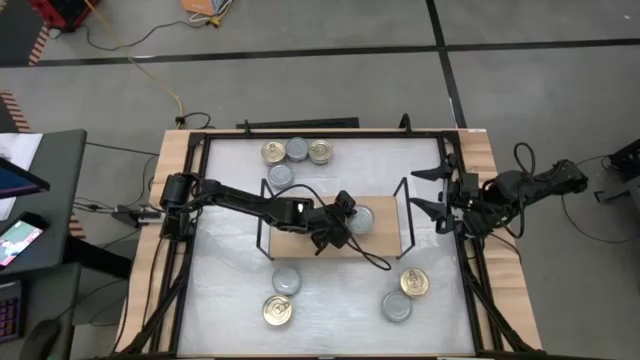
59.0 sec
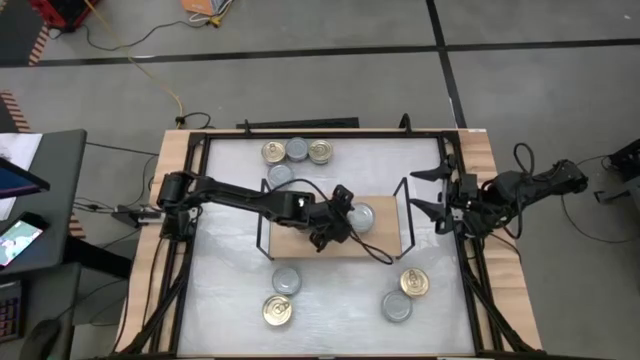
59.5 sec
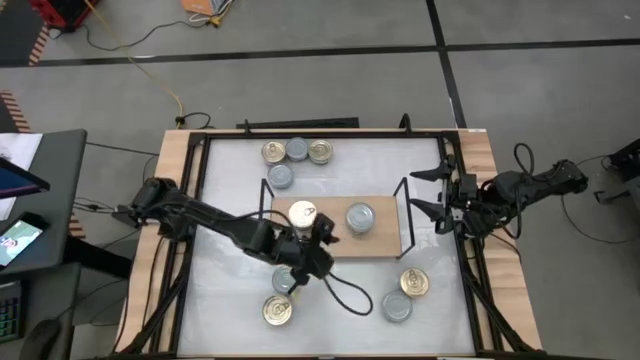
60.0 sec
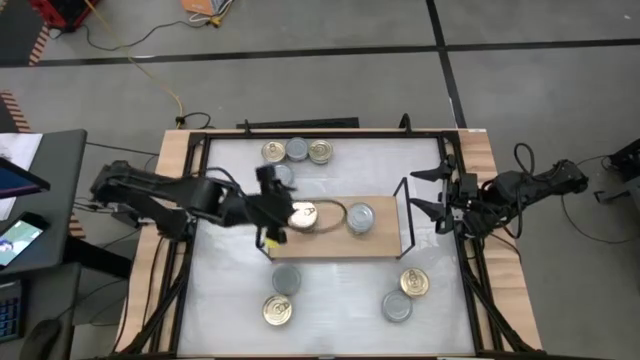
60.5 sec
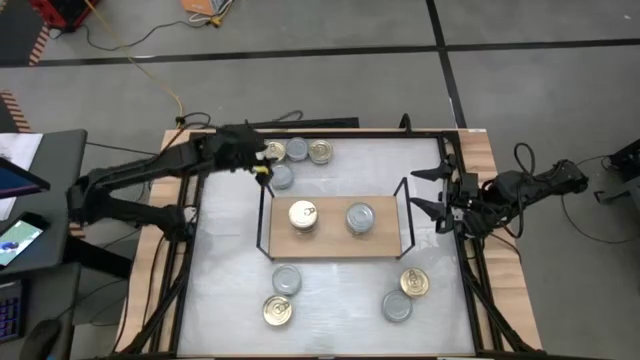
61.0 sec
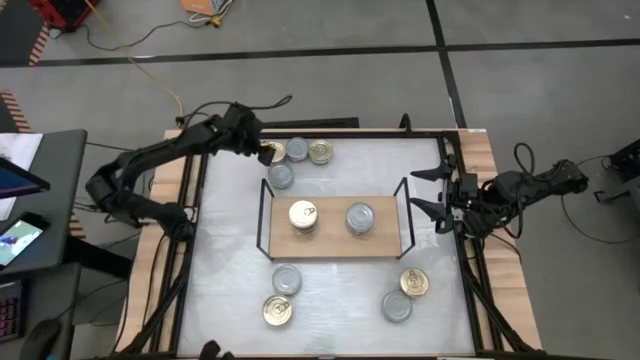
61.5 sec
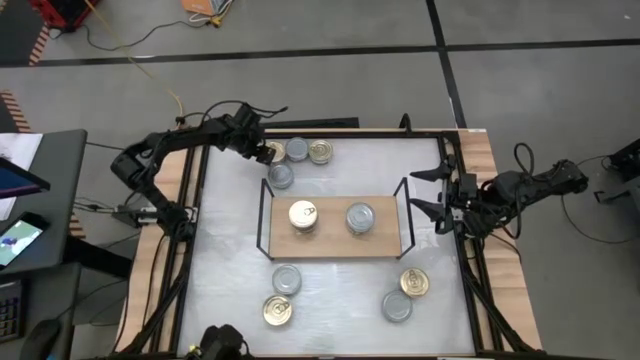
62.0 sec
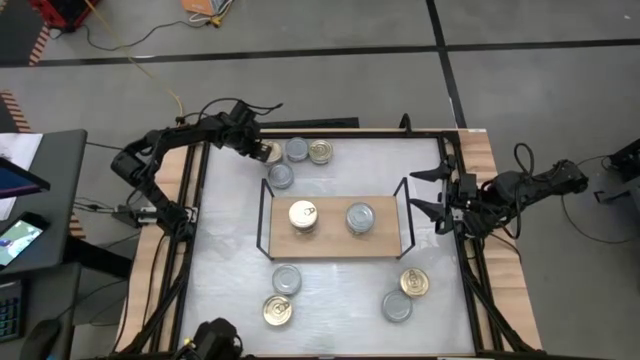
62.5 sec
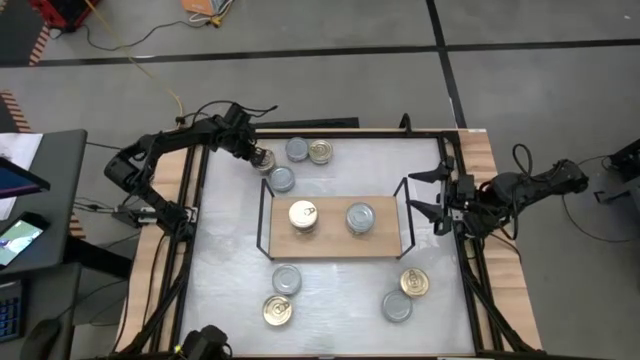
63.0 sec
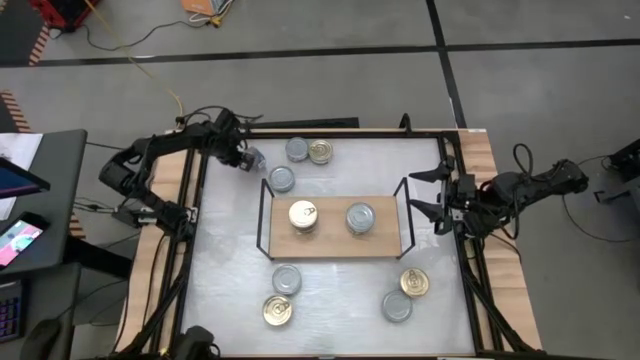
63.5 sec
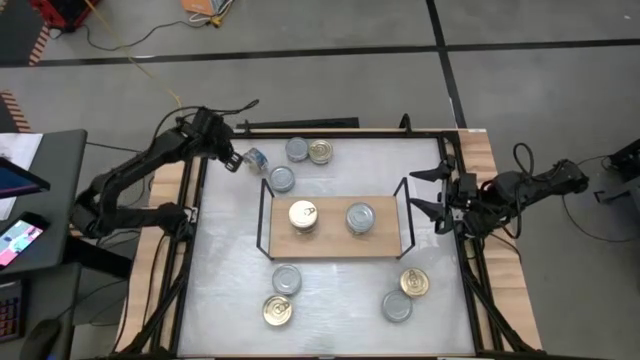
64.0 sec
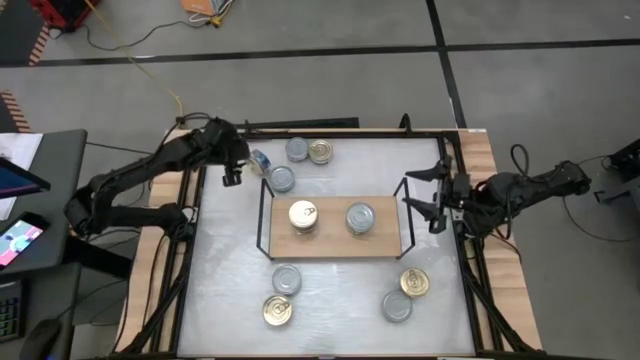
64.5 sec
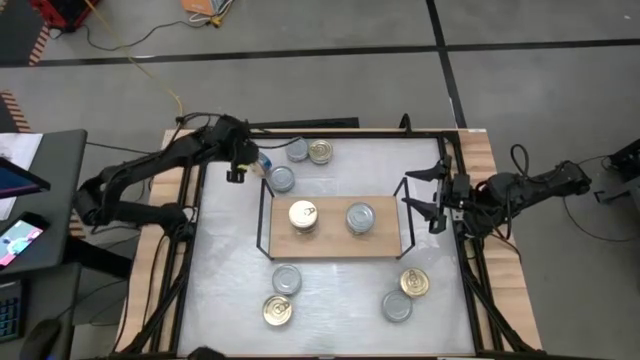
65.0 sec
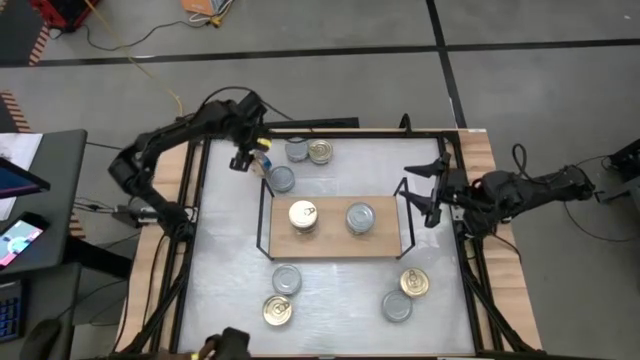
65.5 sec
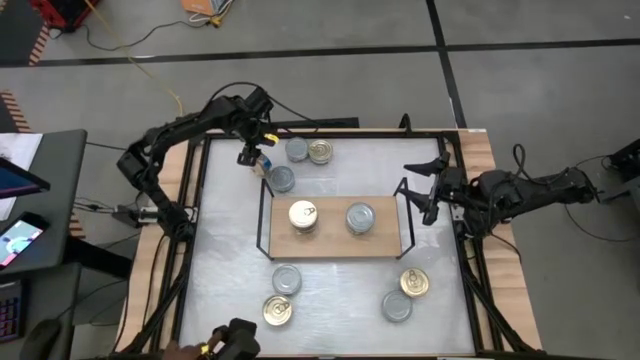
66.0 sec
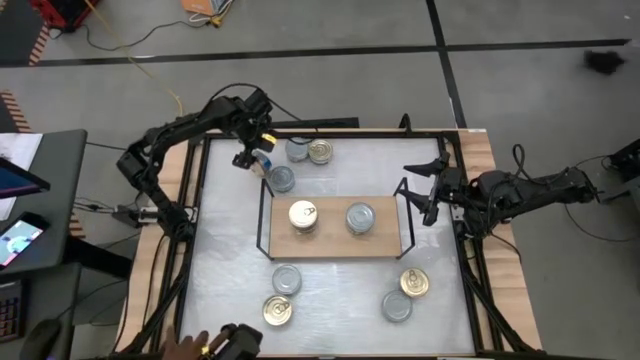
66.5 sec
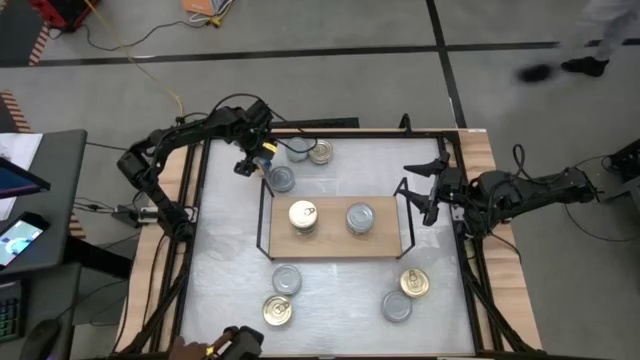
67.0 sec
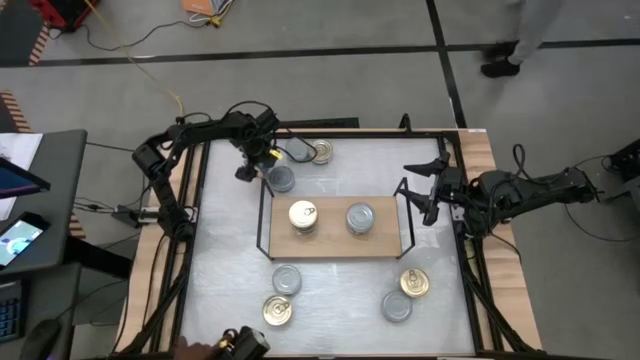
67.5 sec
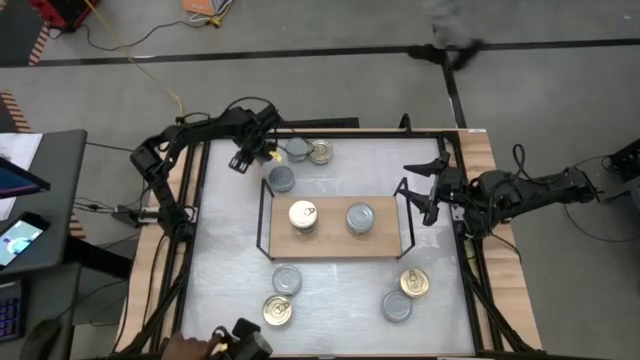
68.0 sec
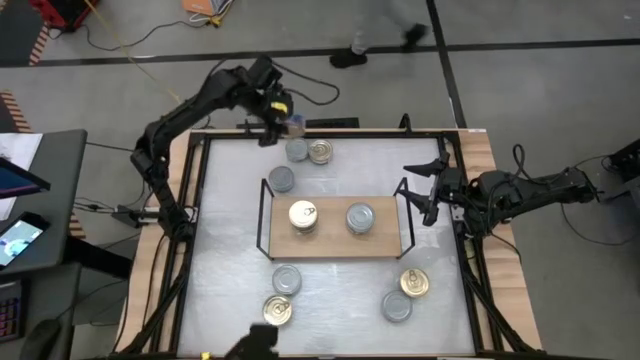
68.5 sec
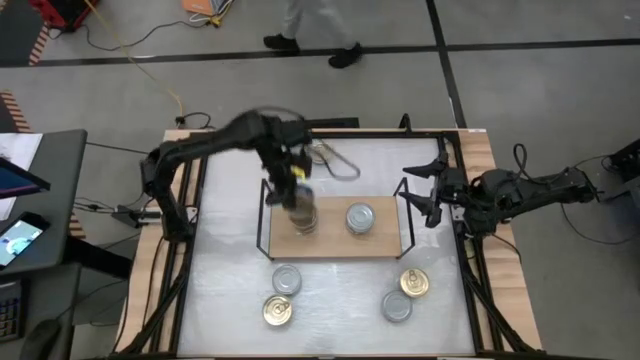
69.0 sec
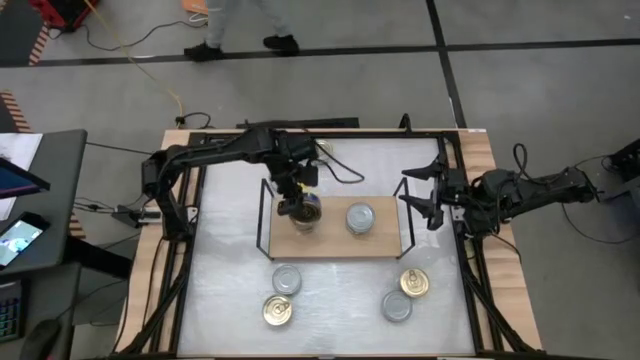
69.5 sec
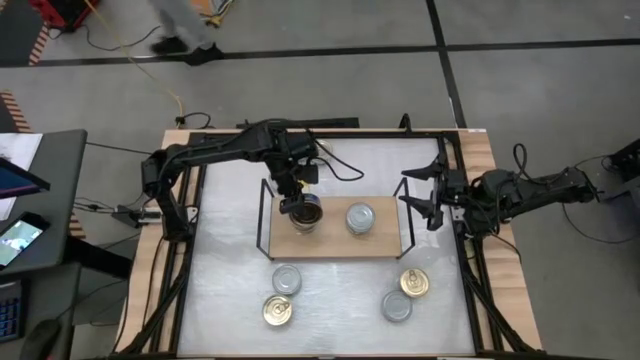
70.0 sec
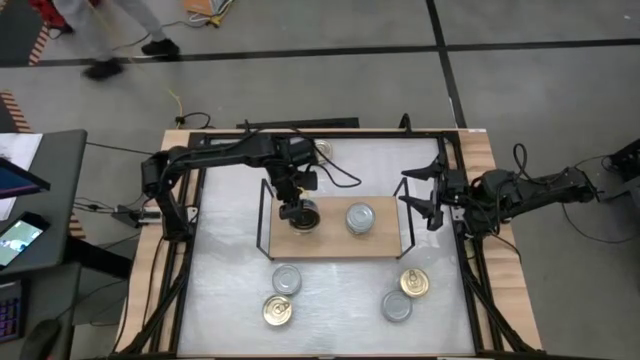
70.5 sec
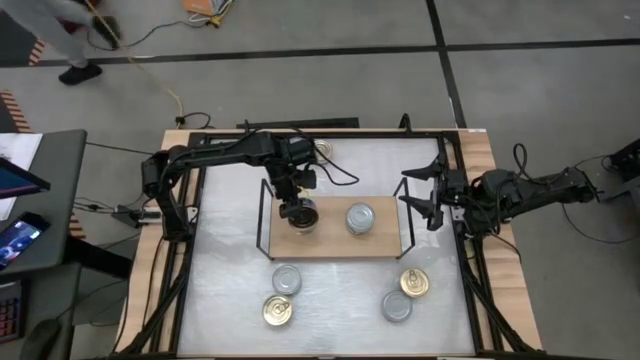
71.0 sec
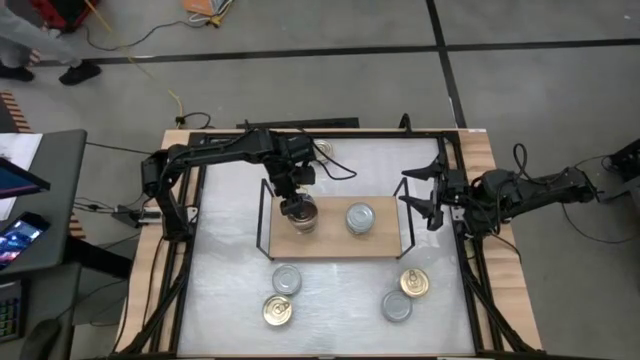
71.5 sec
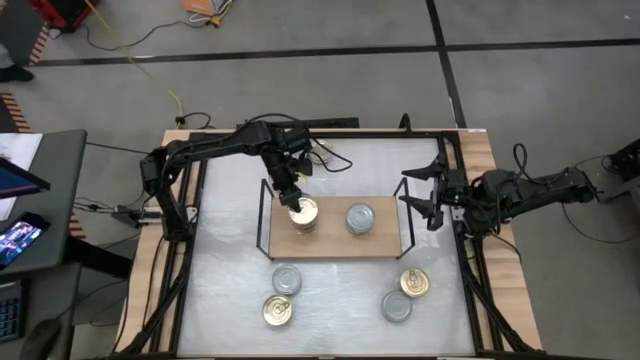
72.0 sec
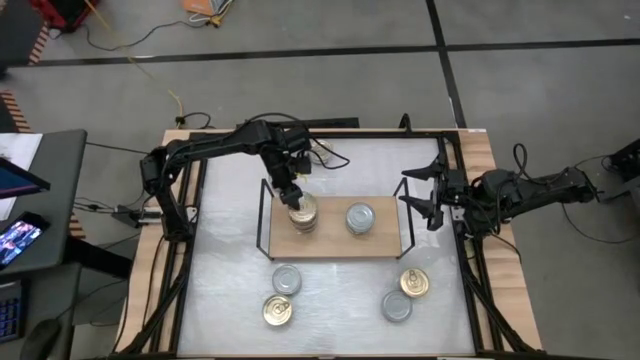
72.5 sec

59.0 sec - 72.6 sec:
Task: Stack canned seafood by type on shelf
Stack the blue tuna can on top of the blue tuna can on the shelf

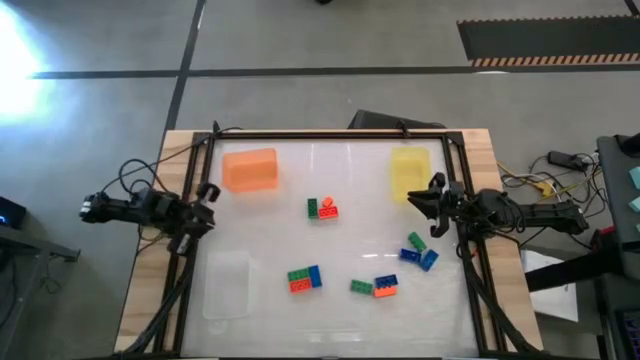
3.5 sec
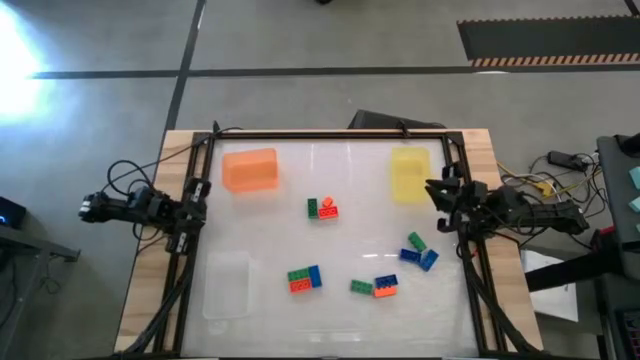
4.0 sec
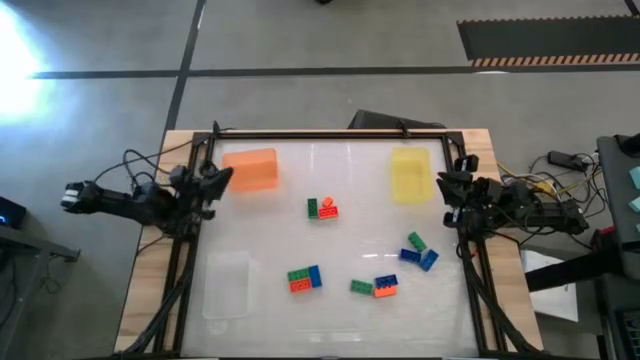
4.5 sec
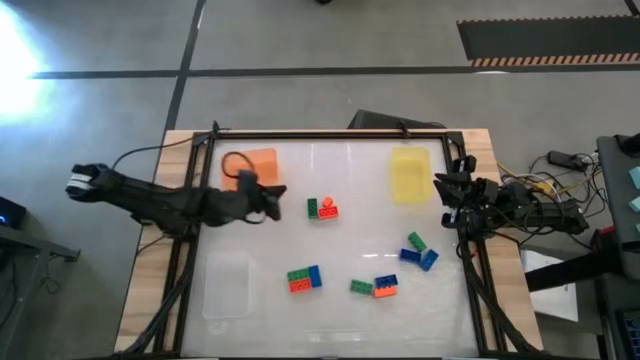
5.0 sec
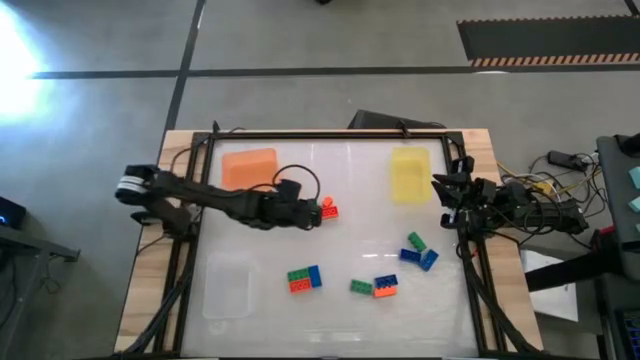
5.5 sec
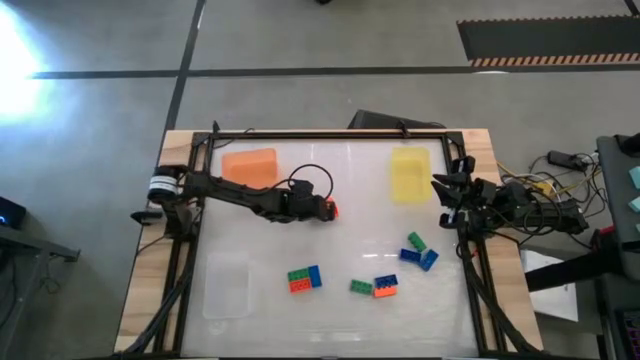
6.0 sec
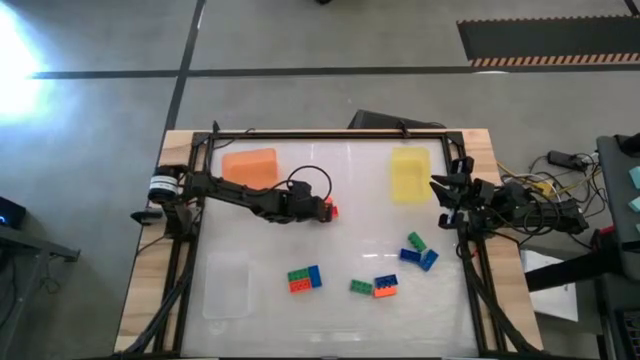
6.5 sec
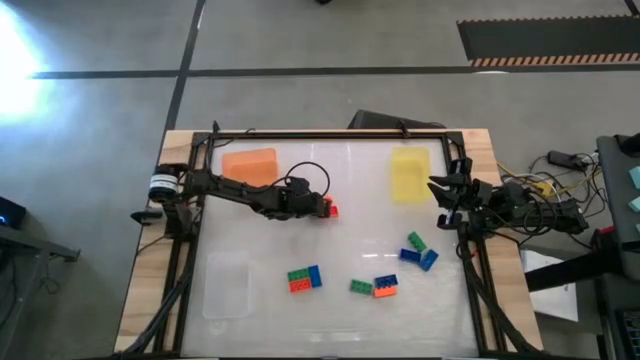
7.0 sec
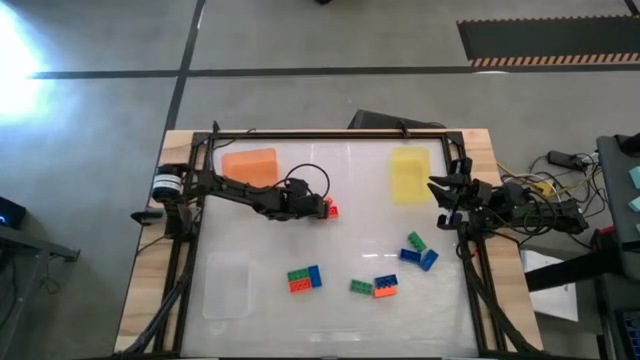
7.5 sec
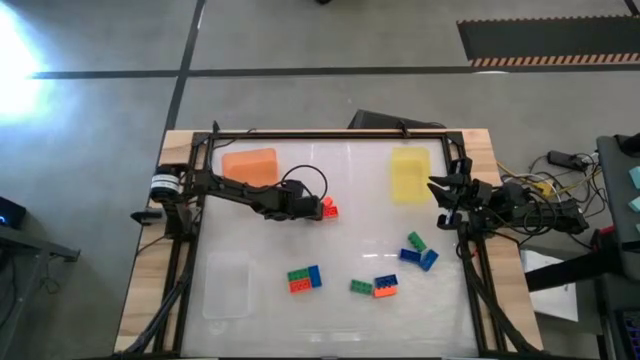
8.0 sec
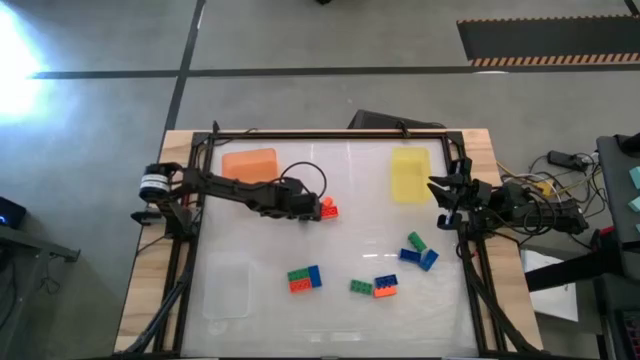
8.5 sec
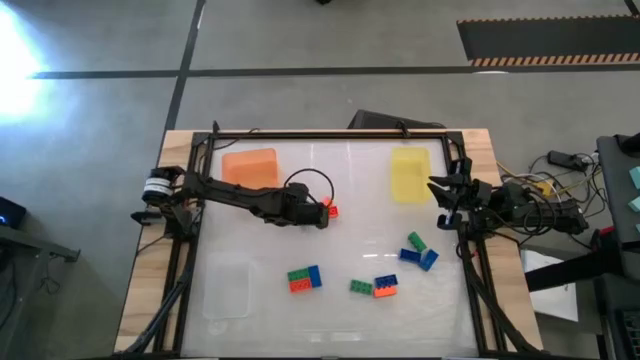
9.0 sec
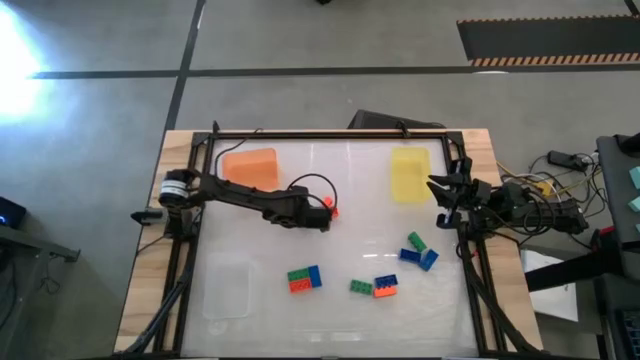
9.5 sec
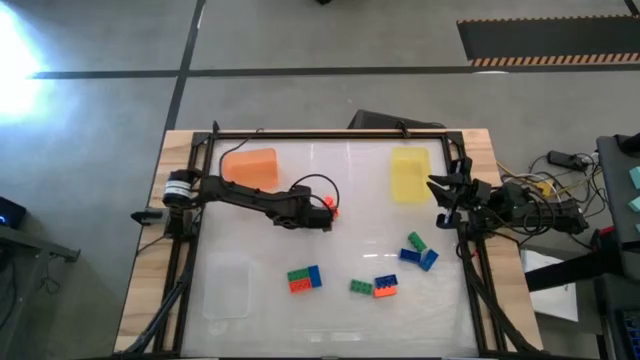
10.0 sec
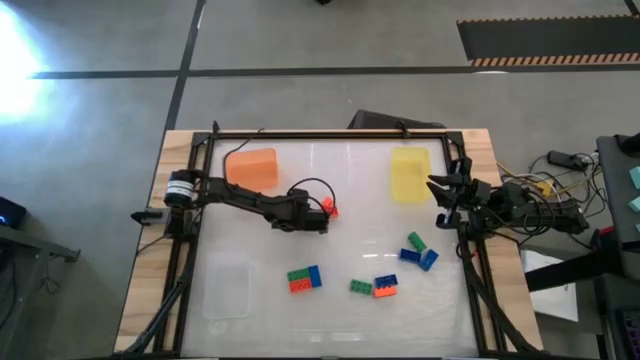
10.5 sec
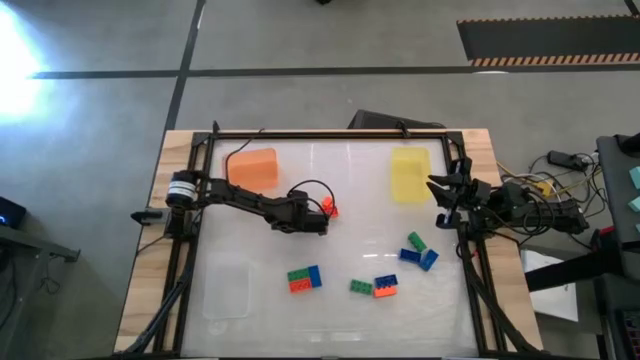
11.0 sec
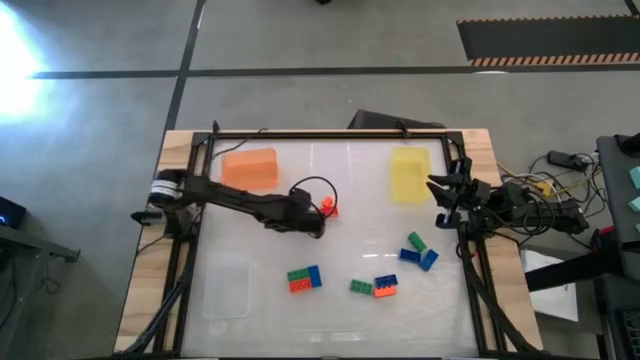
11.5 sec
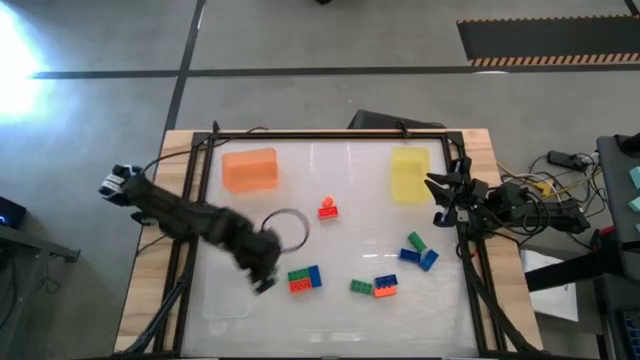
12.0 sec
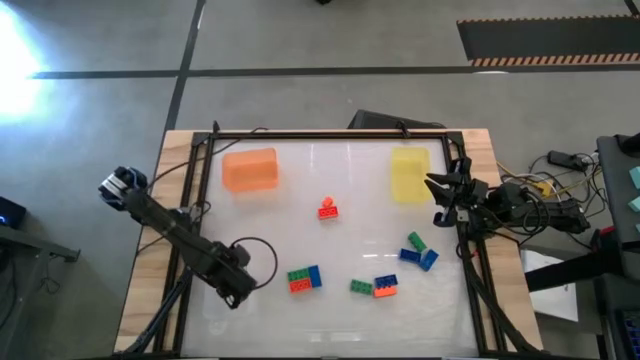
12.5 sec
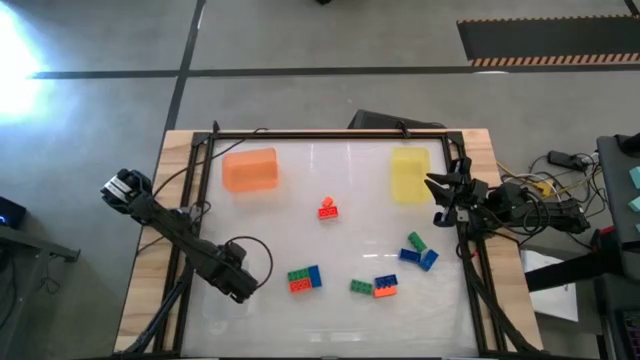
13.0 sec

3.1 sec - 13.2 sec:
Task: Sort & place blocks by color
Put the green game piece into the transparent bin
